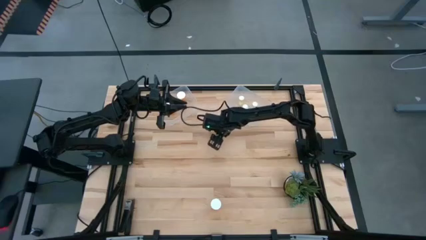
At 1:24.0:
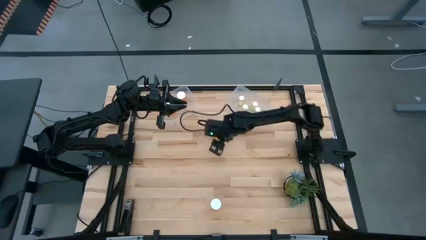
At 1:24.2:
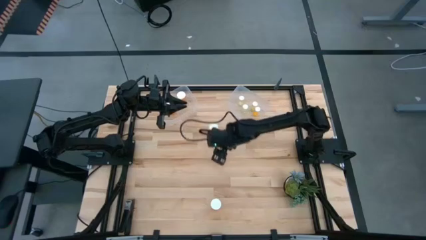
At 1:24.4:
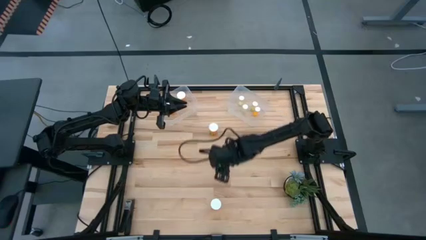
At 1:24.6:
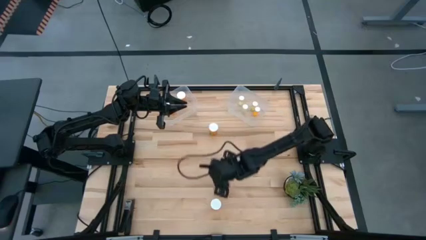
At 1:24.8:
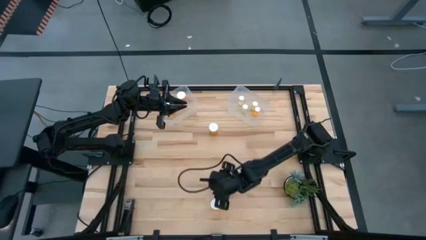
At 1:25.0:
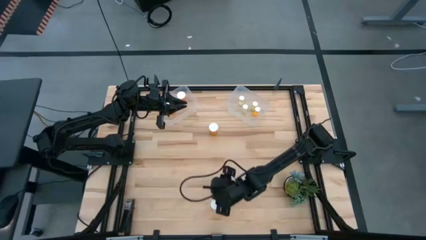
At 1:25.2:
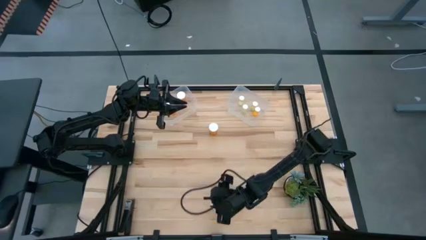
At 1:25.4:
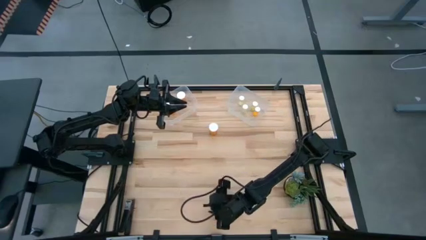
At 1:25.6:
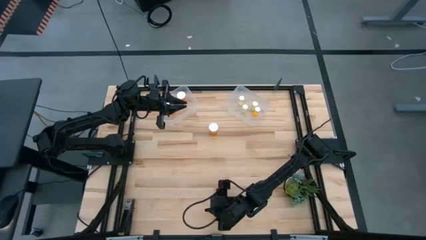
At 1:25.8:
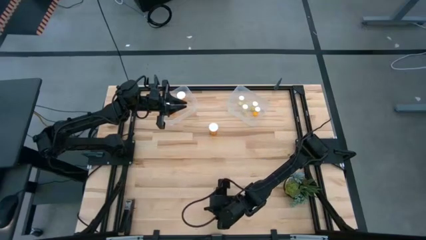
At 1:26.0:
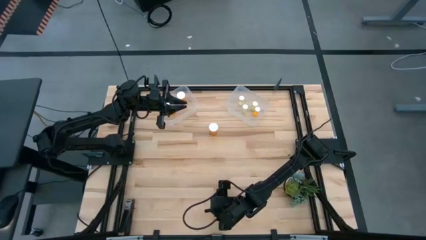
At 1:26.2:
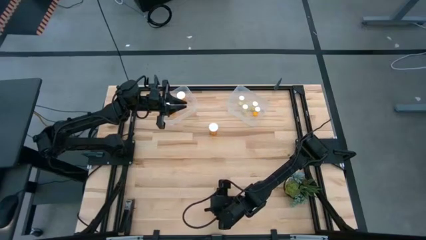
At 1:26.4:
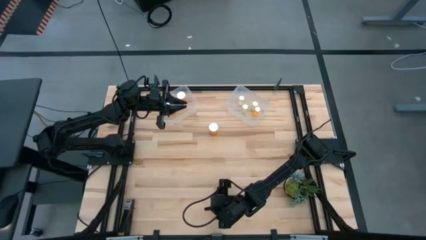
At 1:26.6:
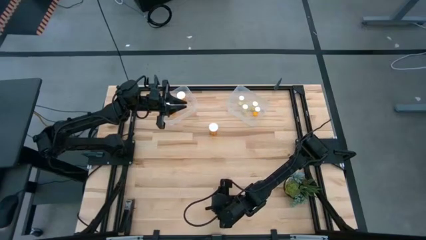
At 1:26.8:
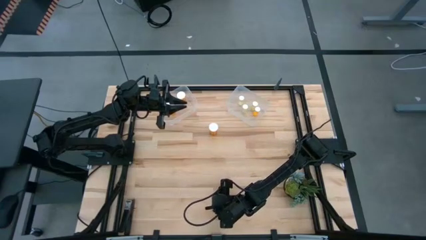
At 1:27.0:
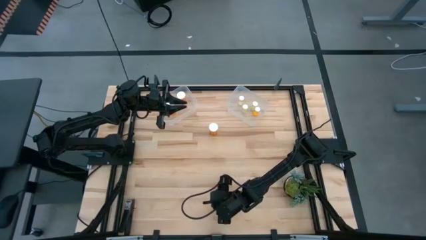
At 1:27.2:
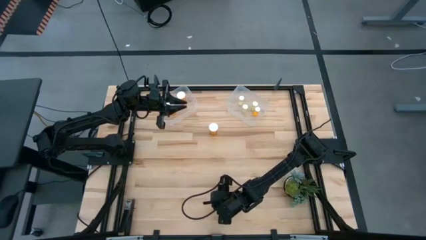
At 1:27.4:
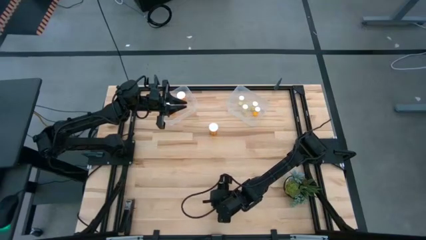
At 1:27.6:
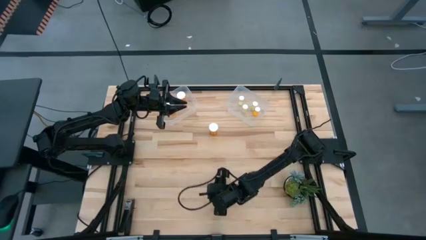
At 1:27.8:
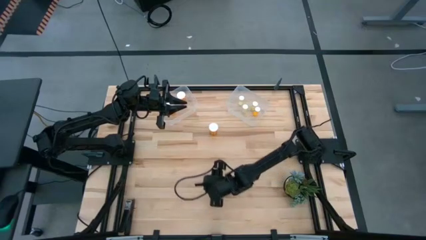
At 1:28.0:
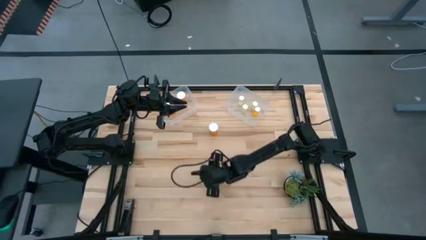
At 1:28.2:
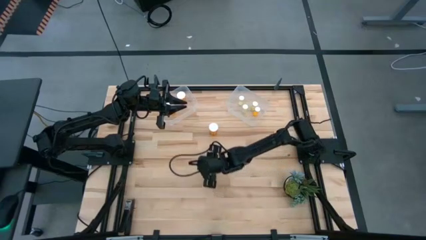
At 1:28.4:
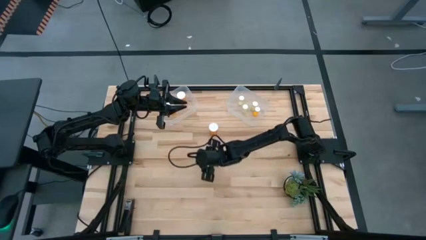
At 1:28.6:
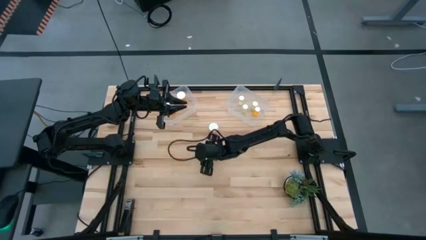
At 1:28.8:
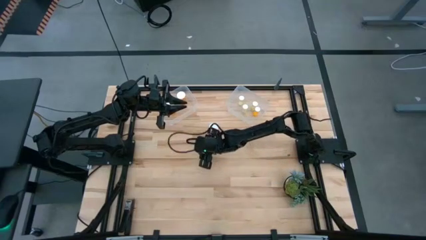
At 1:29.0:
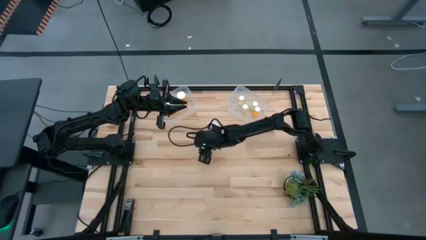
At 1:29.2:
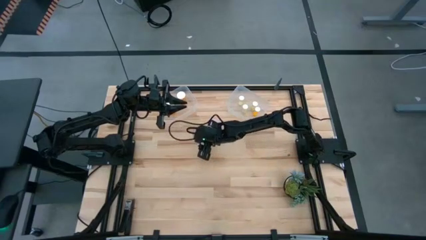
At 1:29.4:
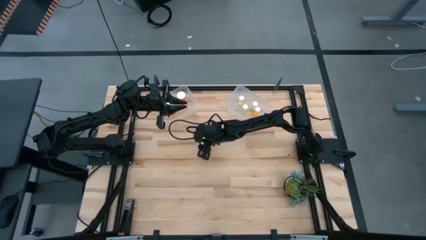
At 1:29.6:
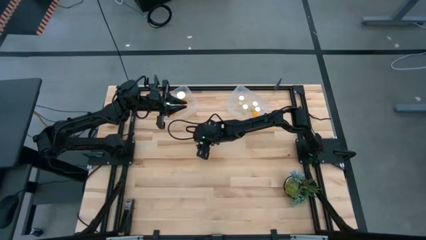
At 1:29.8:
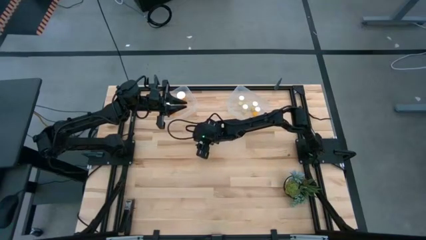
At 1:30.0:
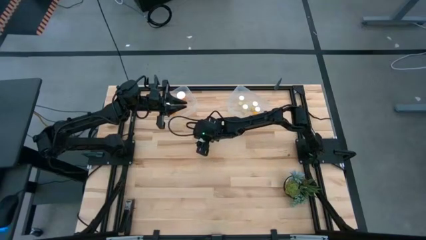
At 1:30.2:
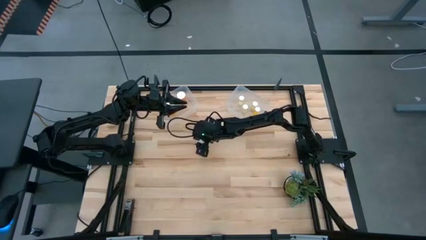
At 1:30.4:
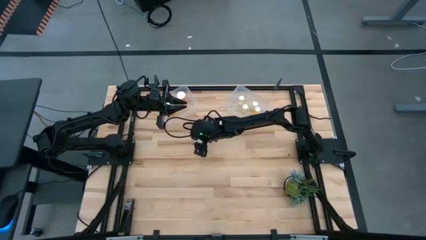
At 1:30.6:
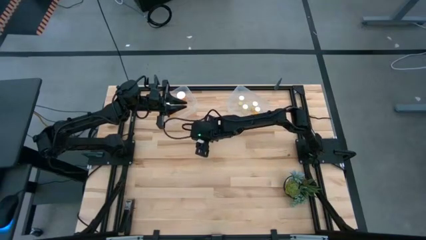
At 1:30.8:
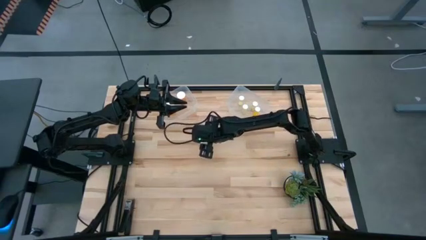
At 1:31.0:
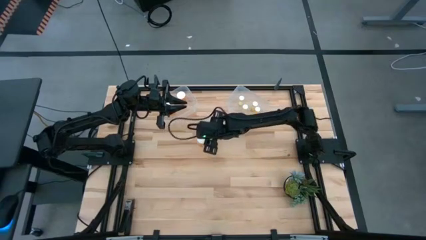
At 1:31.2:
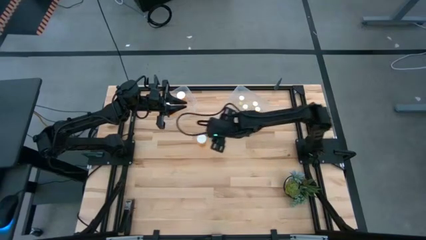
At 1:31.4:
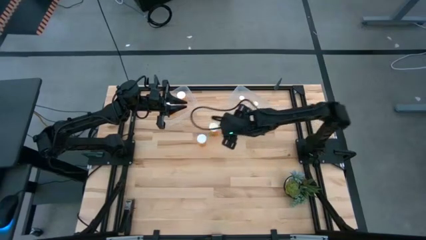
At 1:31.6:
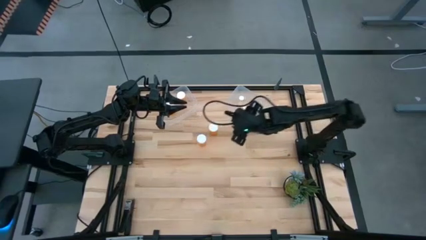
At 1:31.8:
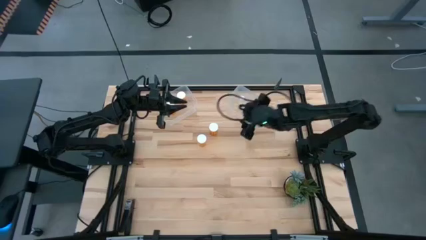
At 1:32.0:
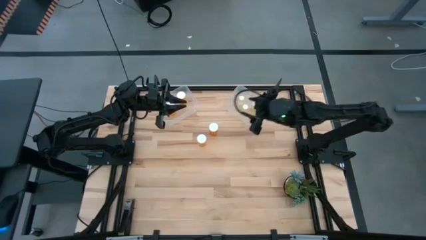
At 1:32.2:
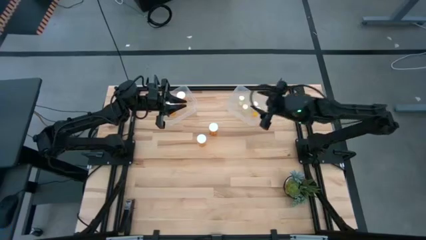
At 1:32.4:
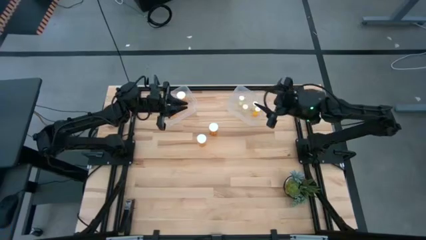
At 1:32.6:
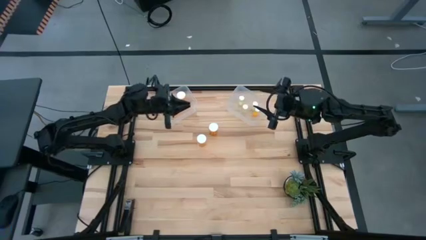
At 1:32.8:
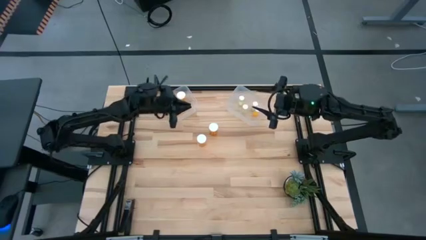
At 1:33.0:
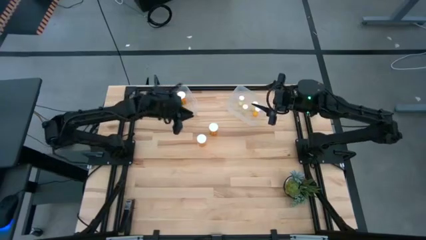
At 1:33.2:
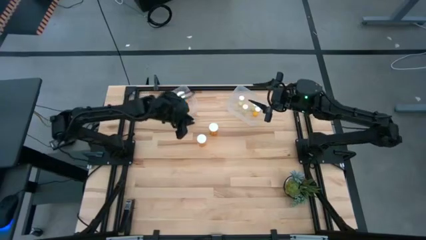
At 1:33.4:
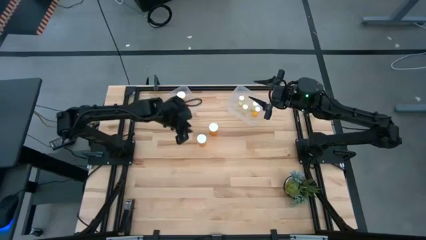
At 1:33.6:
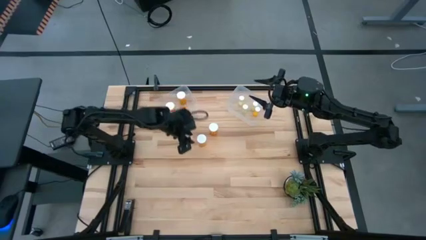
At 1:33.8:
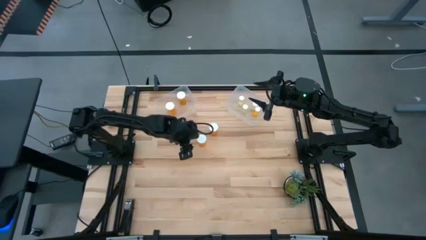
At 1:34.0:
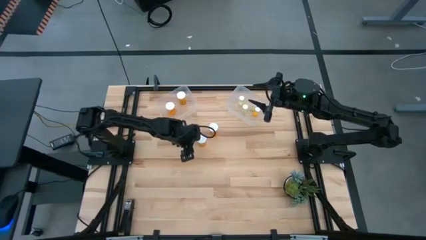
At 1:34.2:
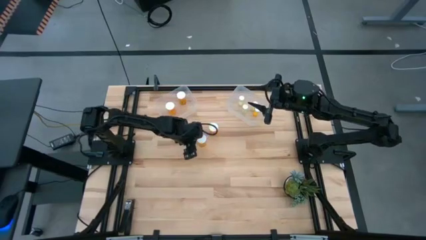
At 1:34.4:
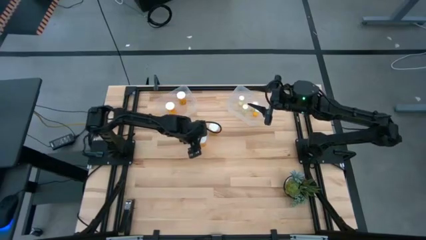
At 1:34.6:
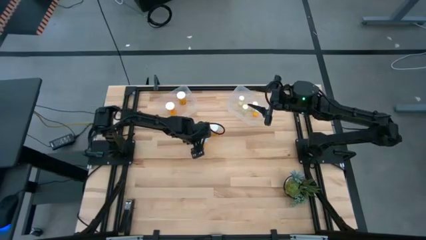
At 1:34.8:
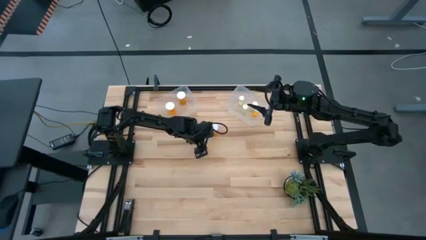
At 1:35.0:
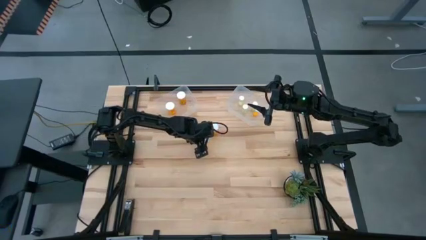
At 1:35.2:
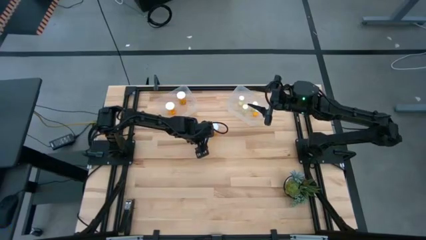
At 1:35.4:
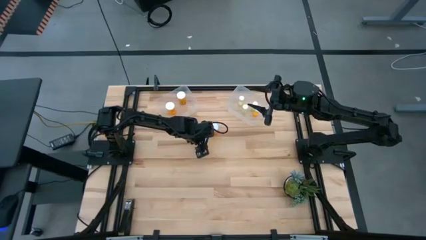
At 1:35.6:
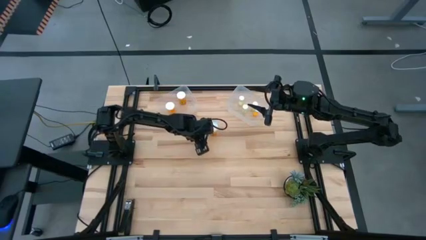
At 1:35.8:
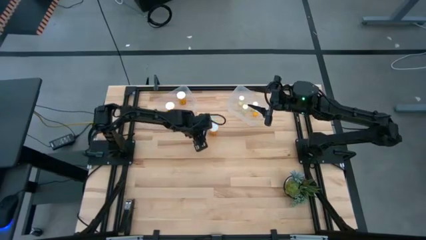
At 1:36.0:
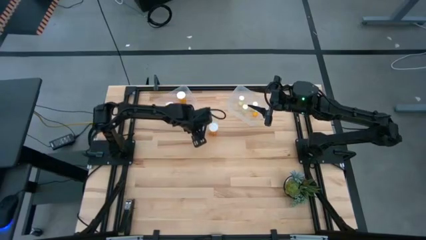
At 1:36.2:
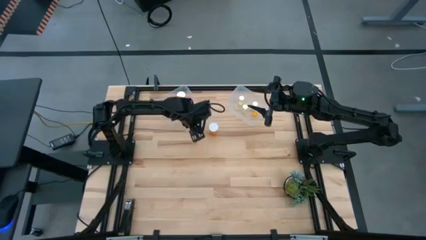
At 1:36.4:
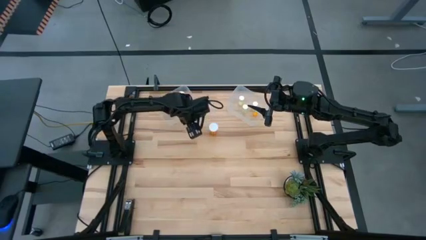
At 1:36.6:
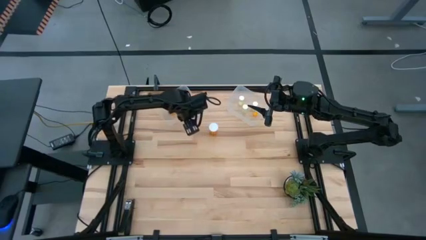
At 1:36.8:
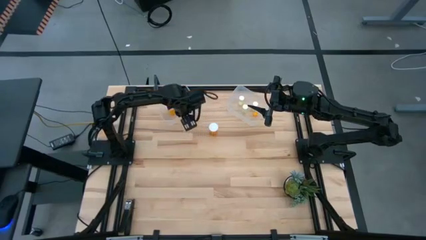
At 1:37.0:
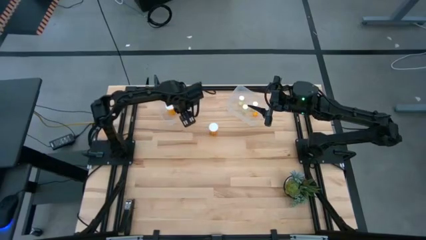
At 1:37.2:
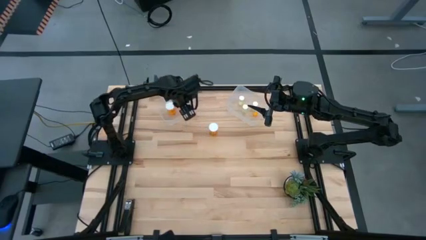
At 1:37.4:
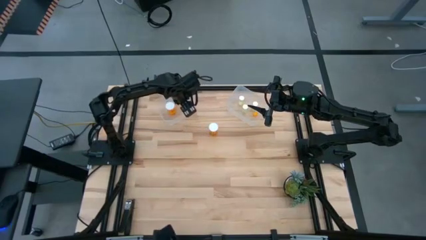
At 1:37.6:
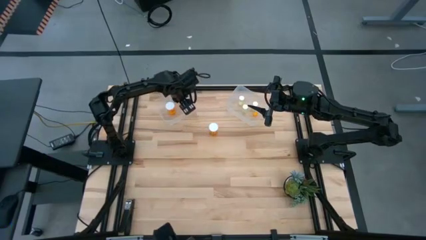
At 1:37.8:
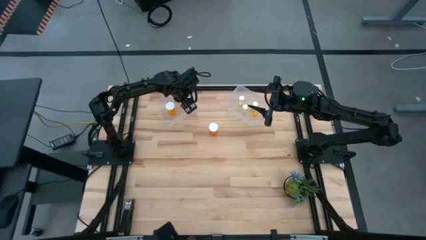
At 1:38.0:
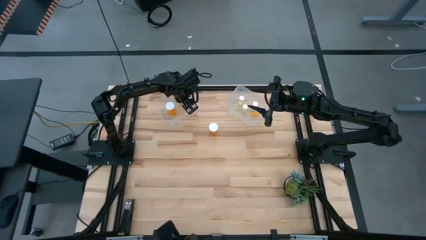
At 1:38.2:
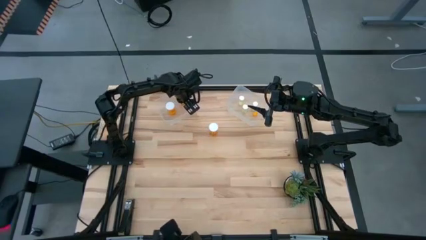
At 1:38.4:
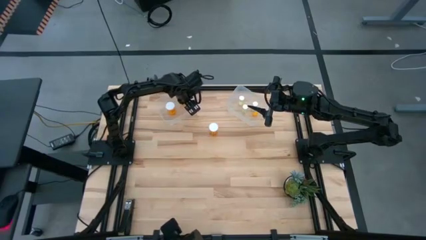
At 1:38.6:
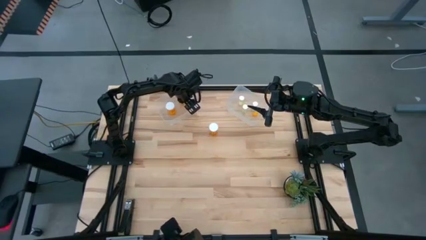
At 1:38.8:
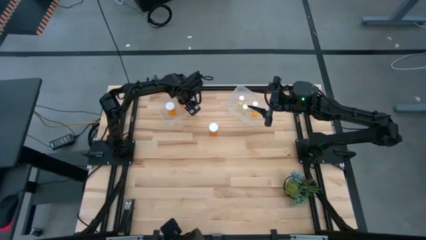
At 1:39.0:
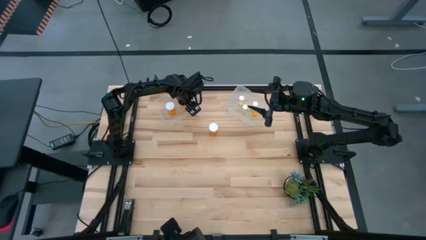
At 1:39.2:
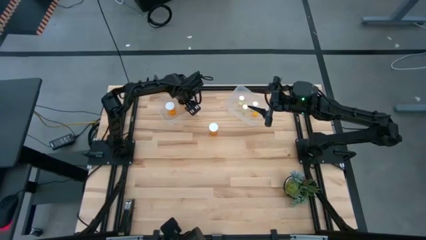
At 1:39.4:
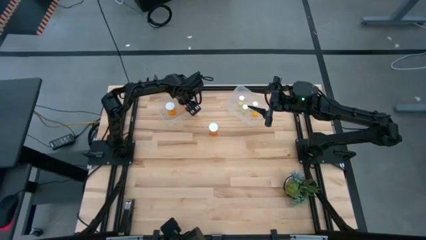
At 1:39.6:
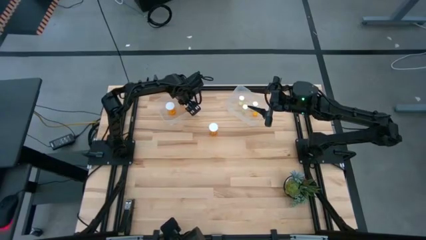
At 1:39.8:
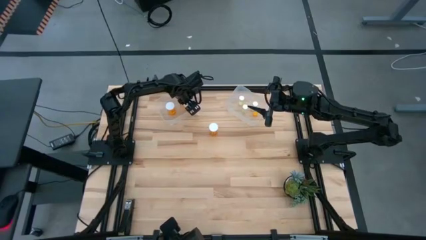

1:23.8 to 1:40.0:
Task: Pick and place medicine bottles into bin by pill shape (circle, oval)
Put the large orange medicine bottle into the left transparent bin
